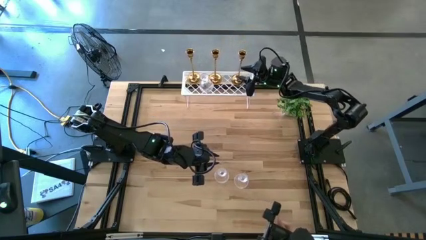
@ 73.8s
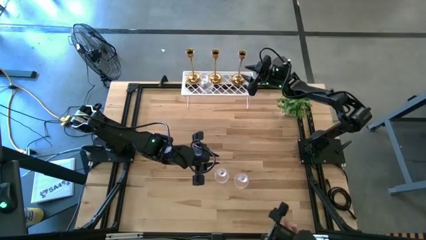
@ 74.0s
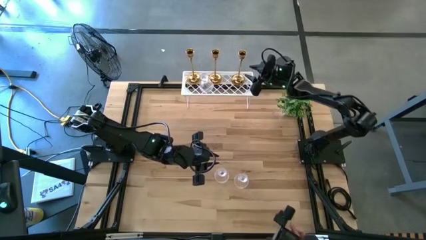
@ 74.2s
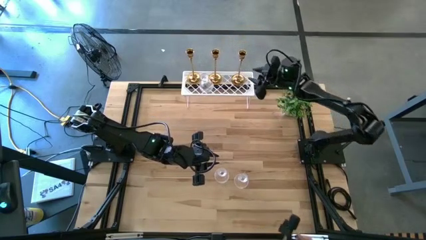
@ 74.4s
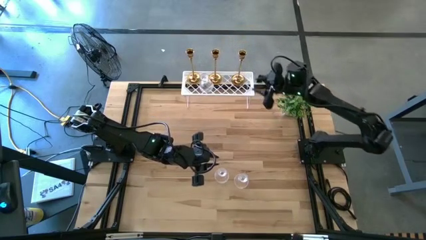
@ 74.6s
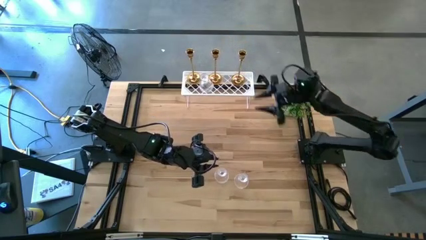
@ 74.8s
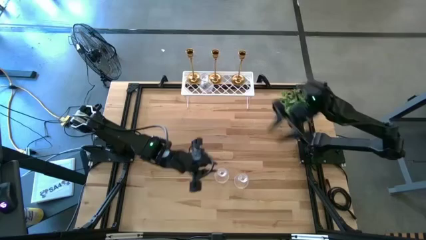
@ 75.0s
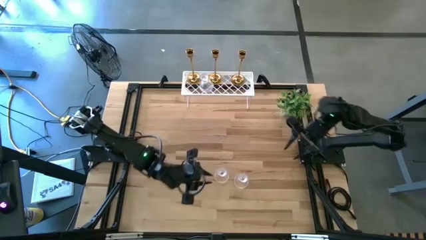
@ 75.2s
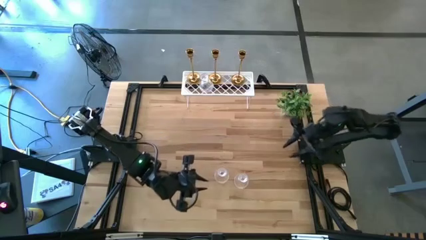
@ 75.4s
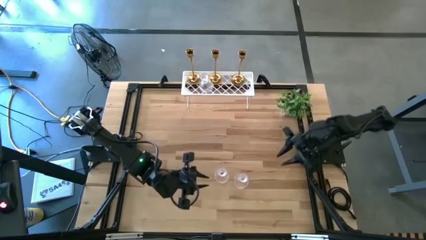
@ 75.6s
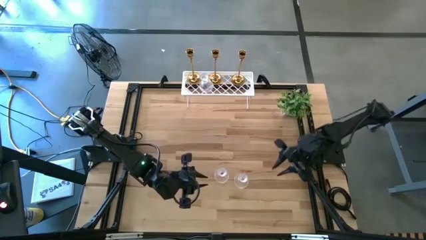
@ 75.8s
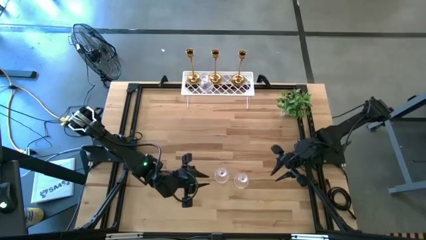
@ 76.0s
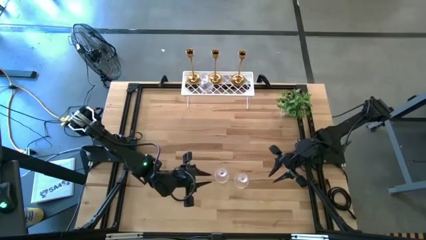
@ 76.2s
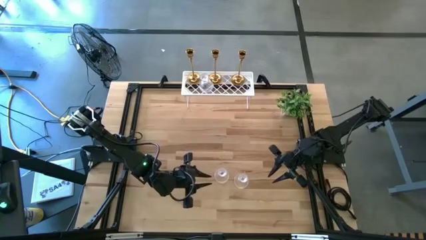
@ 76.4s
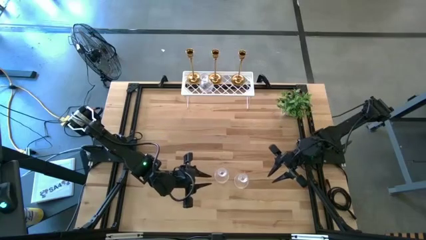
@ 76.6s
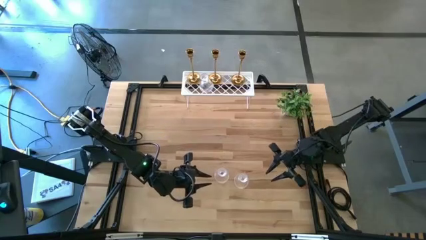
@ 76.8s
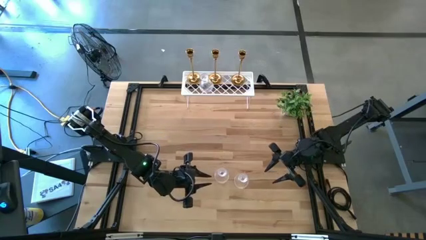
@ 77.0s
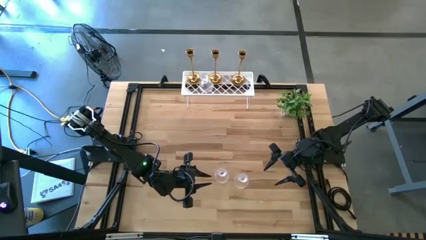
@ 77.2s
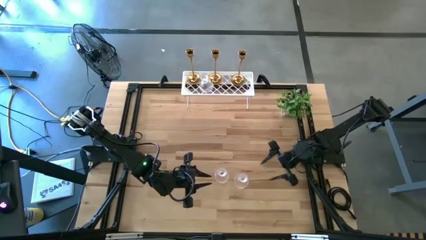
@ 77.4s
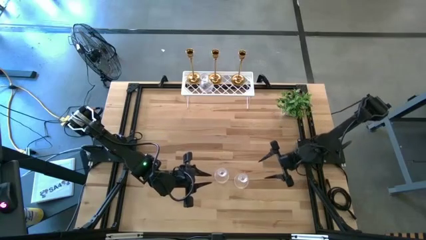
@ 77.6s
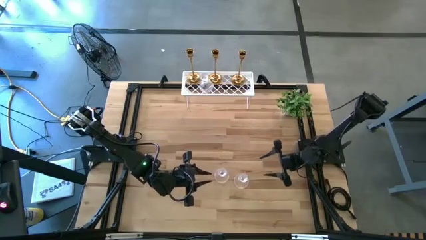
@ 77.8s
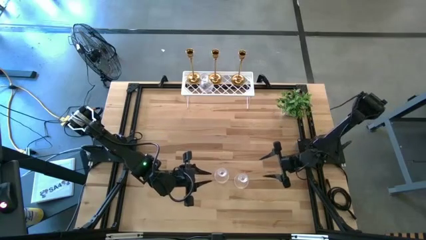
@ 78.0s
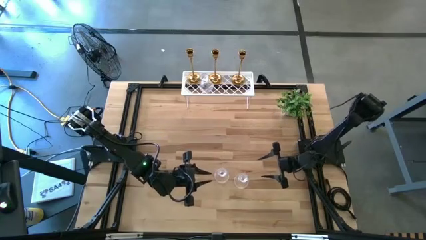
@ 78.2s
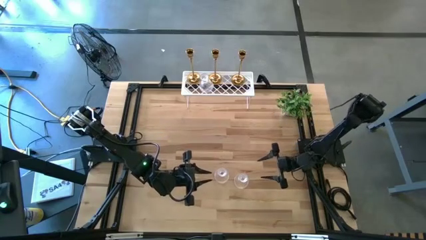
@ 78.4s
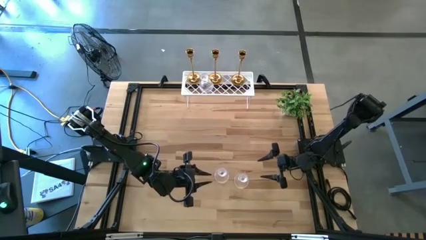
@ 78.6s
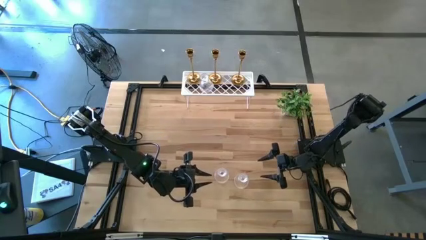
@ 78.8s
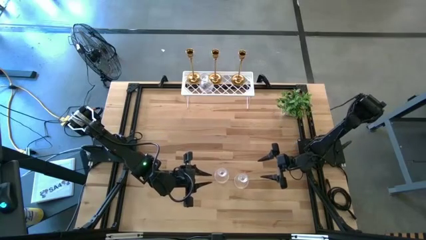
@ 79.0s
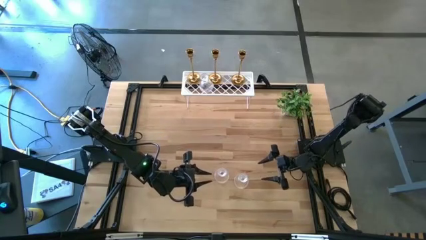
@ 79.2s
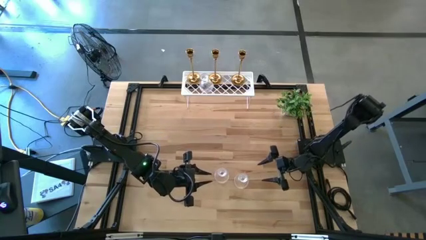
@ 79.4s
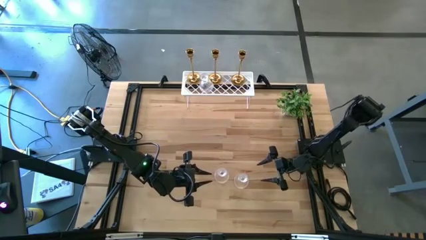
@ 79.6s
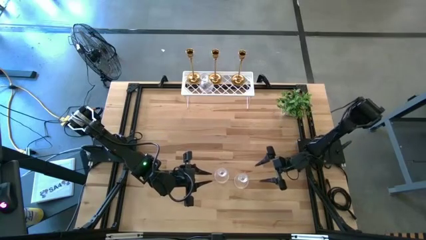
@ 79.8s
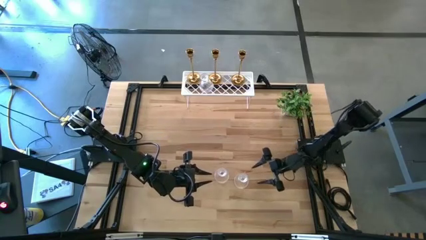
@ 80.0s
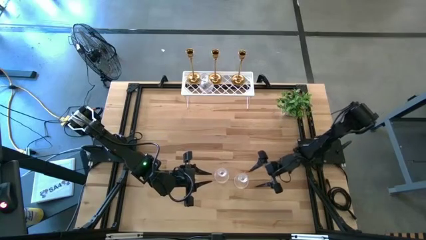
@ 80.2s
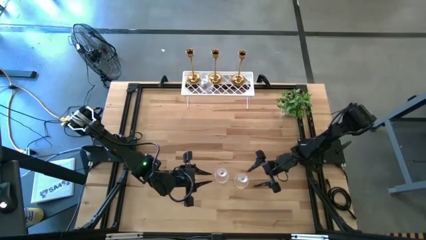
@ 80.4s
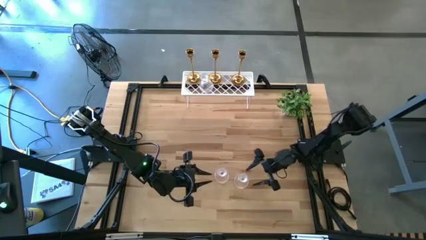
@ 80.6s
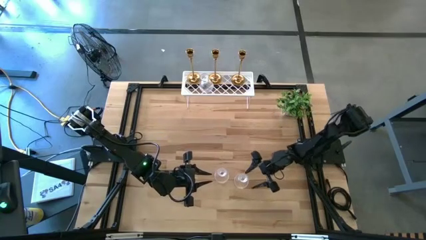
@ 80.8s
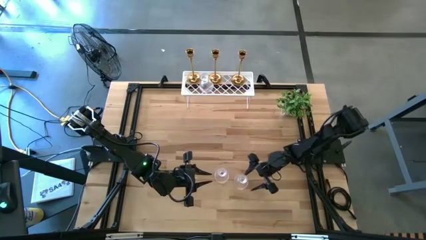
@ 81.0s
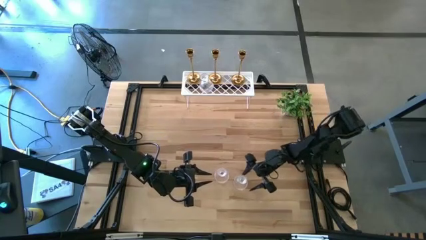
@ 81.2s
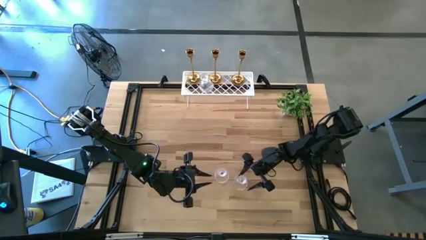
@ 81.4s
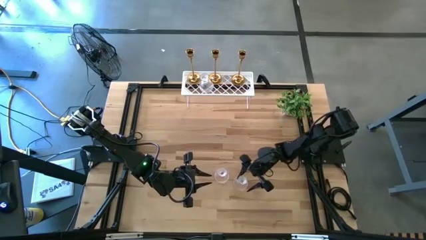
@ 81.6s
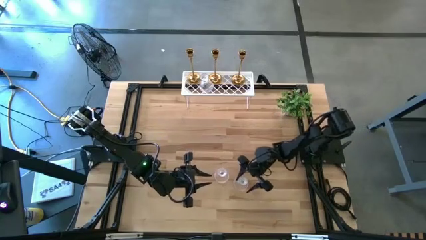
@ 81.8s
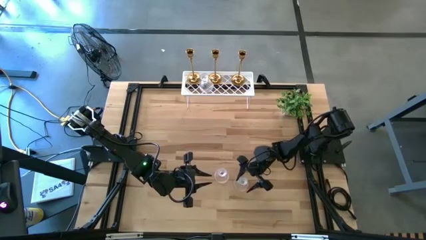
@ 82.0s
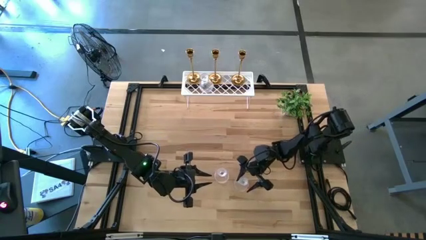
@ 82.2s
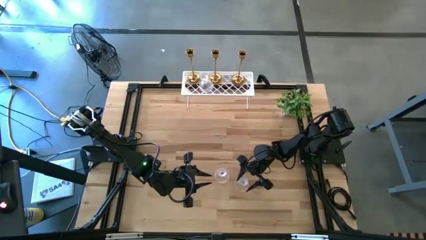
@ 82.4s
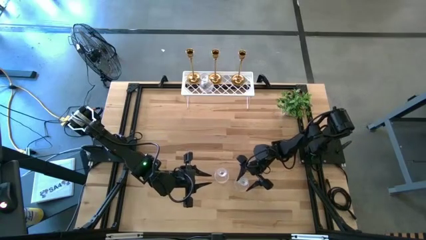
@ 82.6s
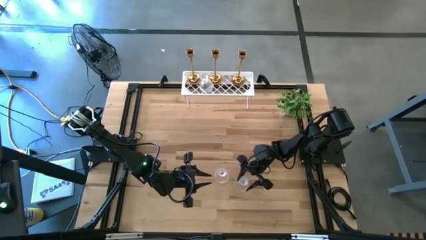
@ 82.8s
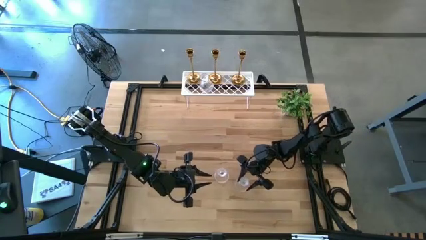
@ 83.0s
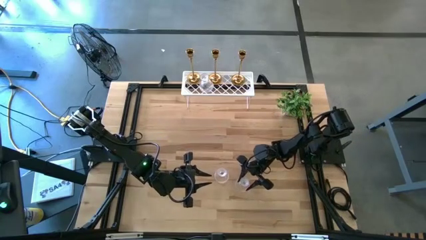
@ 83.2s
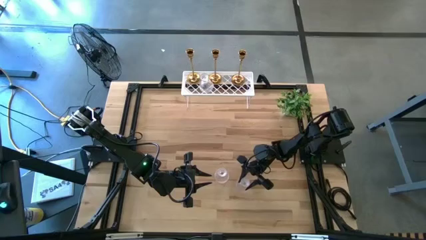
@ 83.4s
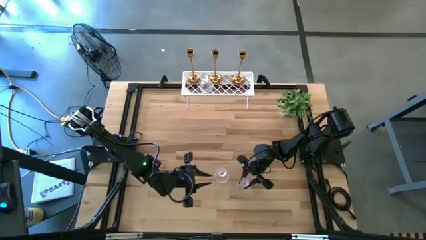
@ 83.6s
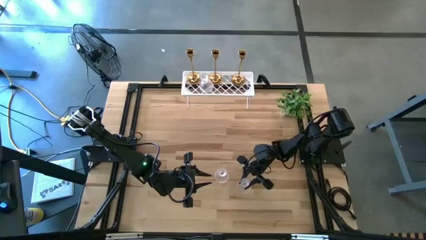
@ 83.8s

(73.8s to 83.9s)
Task: Pick & Place candle stick holders
Put the right glass candle holder on the shelf

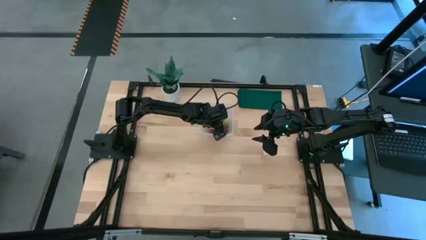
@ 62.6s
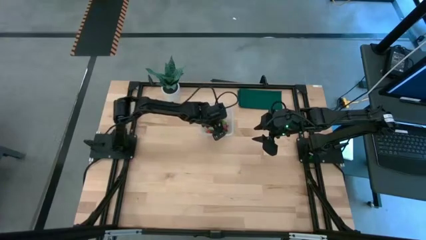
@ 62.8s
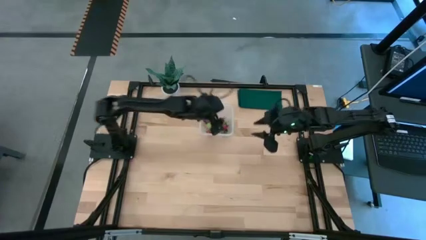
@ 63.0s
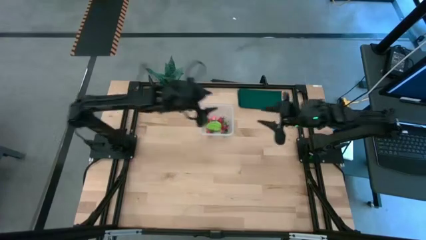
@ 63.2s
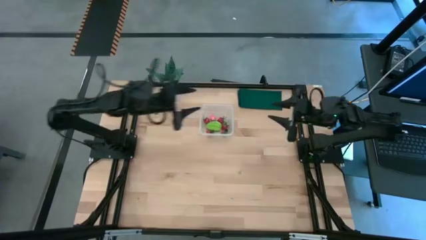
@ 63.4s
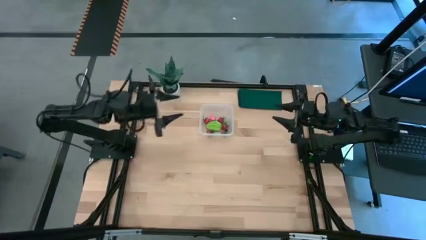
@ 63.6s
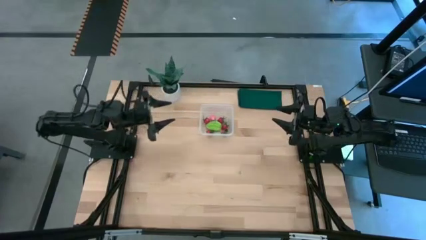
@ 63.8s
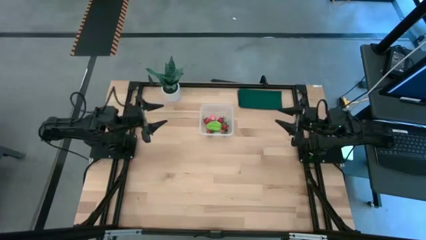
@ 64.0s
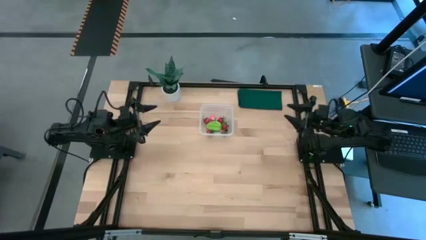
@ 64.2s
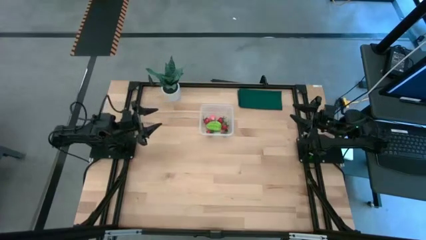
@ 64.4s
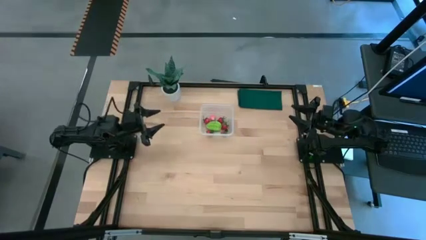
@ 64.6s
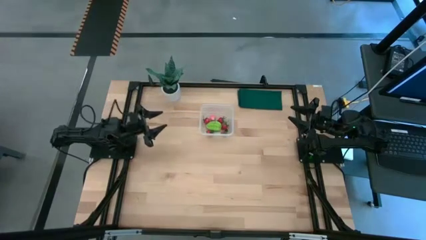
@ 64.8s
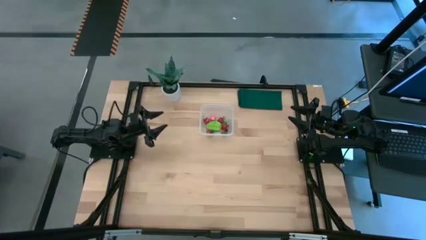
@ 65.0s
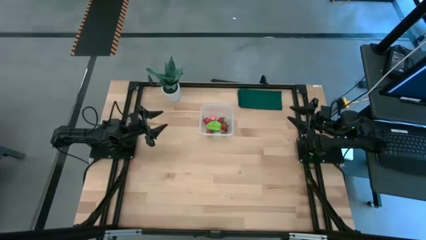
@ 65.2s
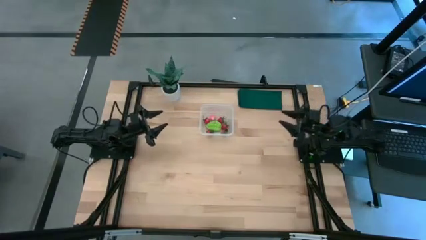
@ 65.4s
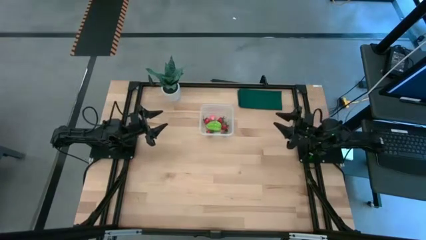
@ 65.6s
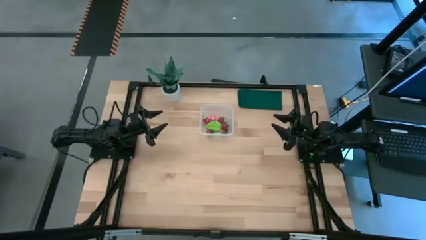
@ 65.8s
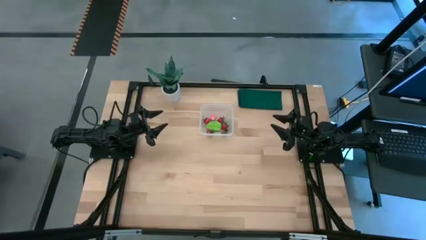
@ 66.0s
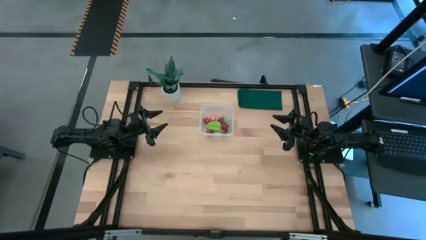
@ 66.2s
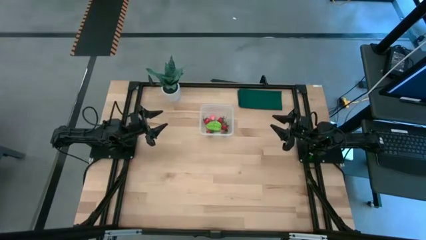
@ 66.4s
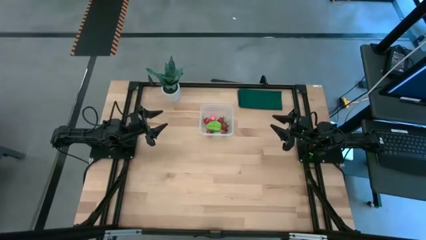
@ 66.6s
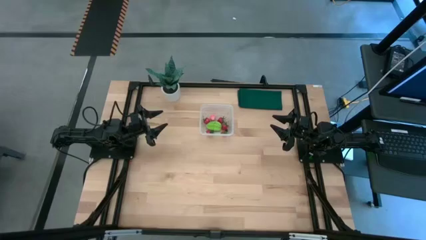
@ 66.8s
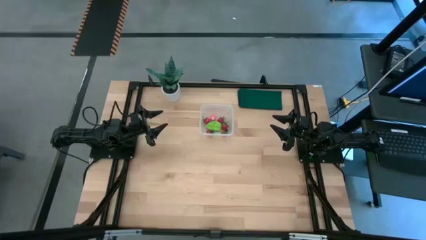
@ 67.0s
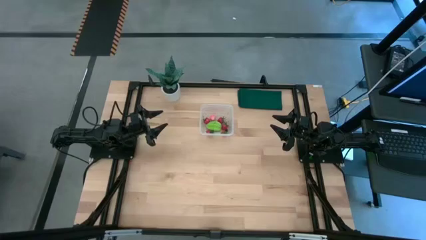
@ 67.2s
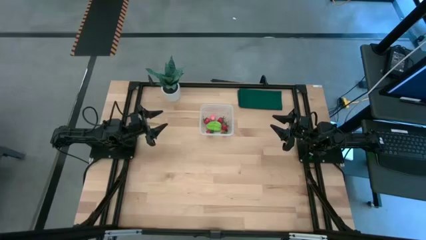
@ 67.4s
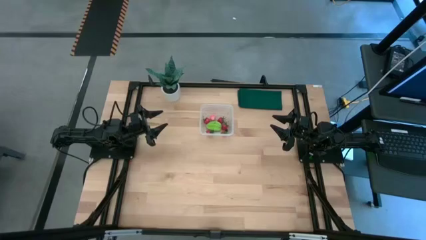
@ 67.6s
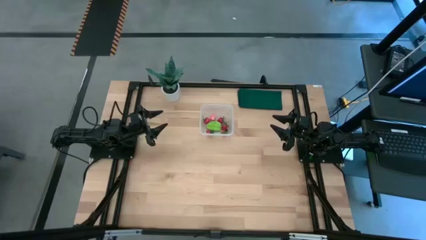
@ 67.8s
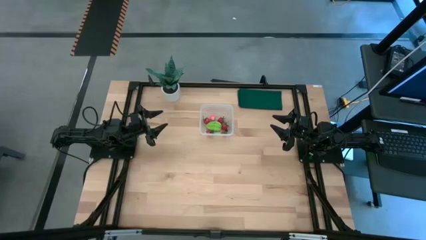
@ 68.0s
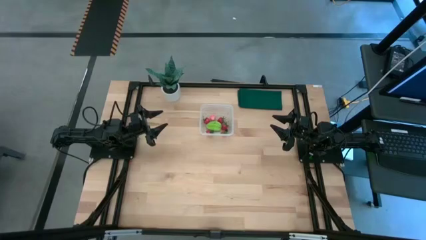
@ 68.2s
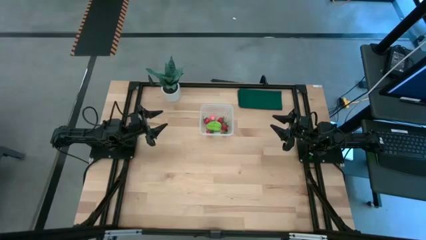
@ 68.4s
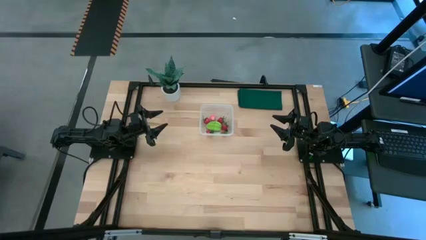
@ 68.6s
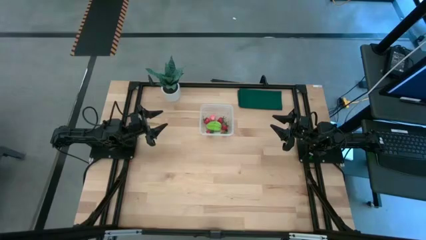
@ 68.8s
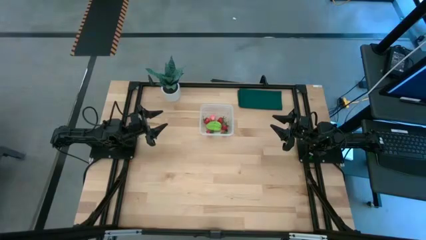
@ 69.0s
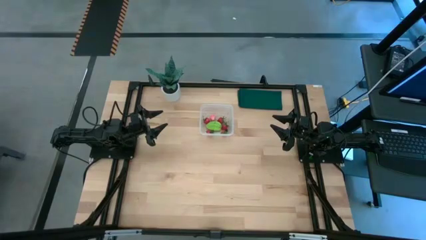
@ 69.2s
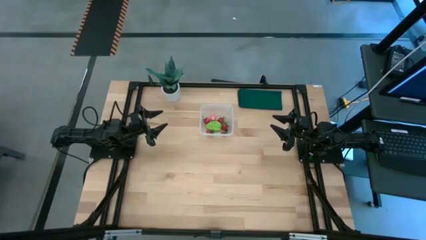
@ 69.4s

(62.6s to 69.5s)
Task: Pick and placing Produce into tupperware
Return to Home Position
